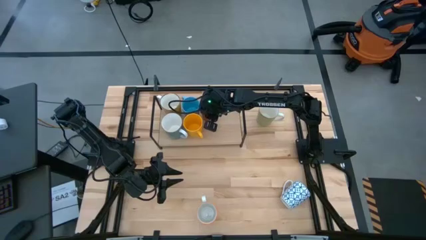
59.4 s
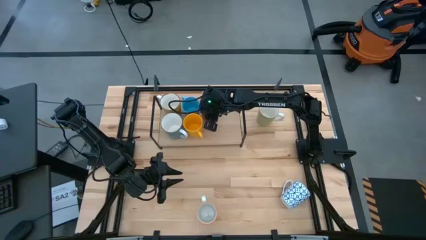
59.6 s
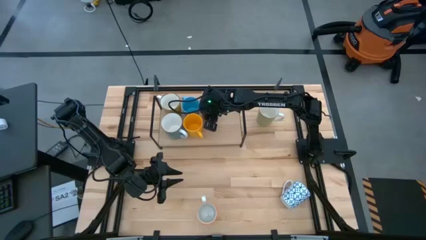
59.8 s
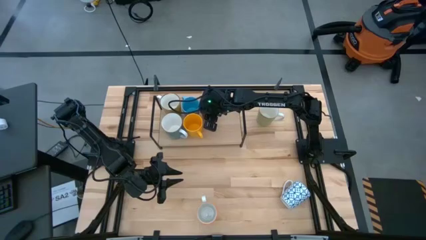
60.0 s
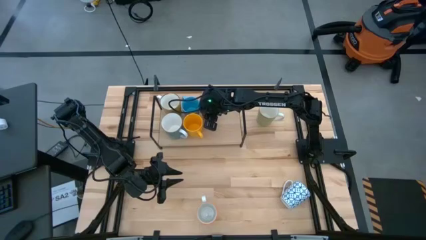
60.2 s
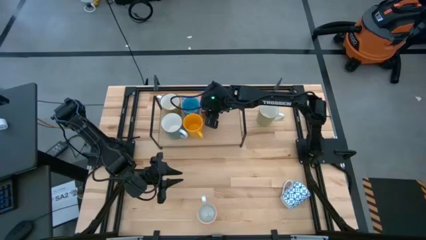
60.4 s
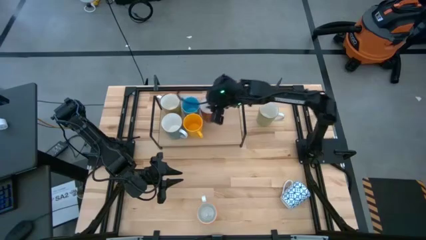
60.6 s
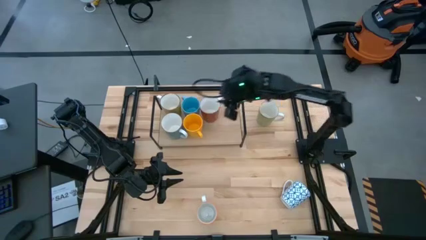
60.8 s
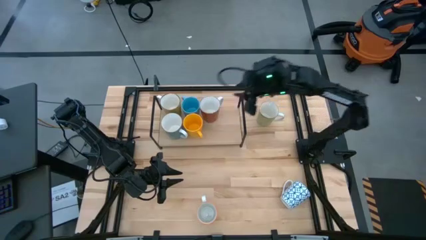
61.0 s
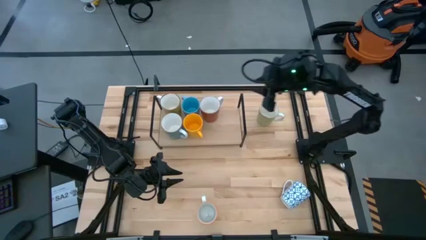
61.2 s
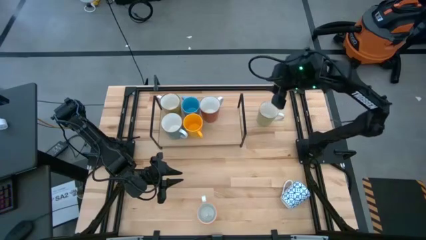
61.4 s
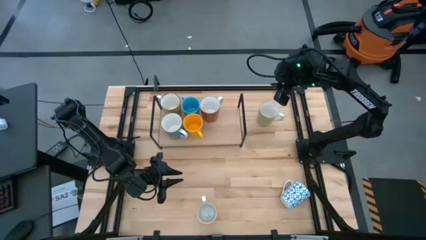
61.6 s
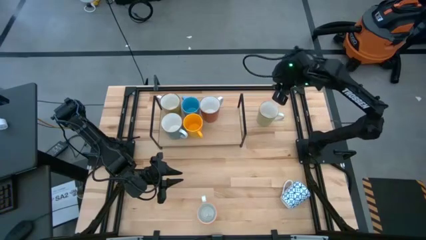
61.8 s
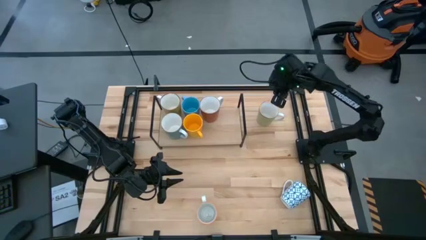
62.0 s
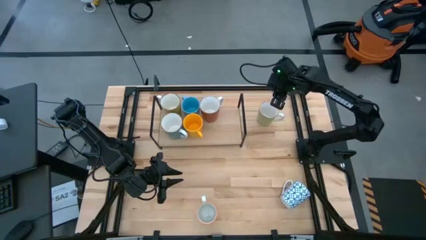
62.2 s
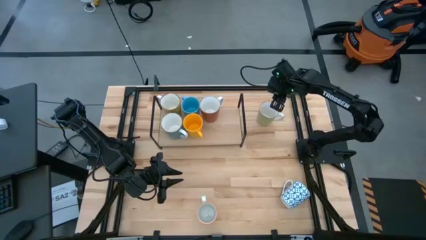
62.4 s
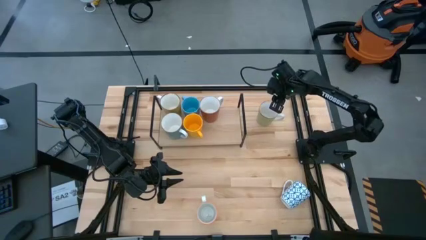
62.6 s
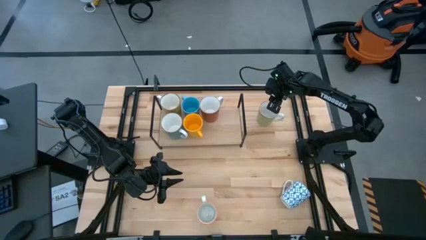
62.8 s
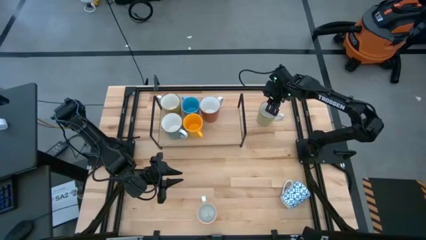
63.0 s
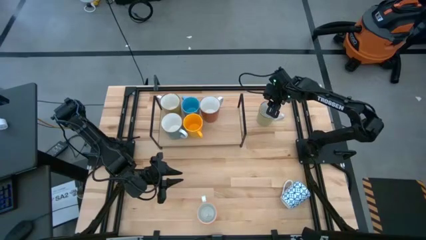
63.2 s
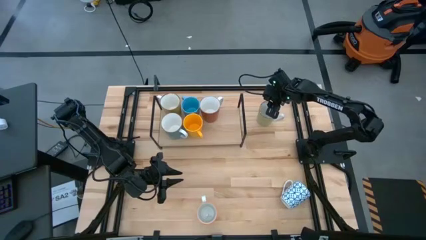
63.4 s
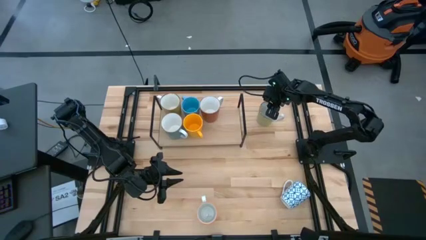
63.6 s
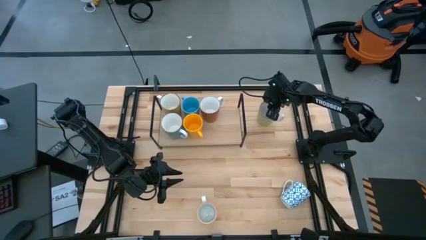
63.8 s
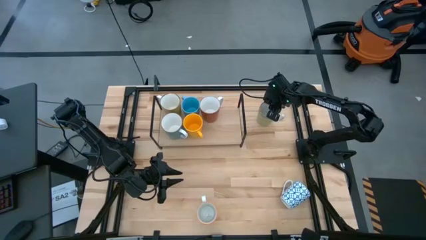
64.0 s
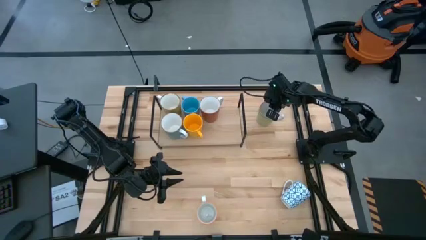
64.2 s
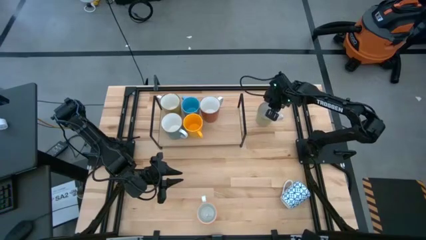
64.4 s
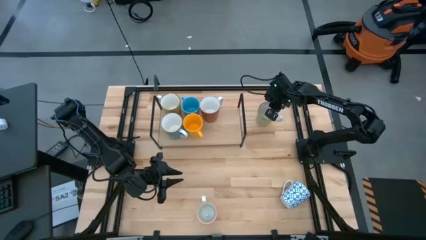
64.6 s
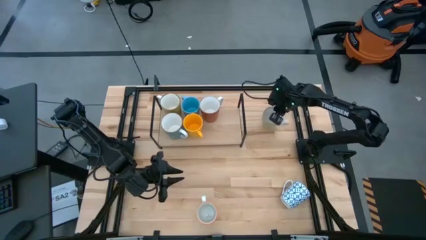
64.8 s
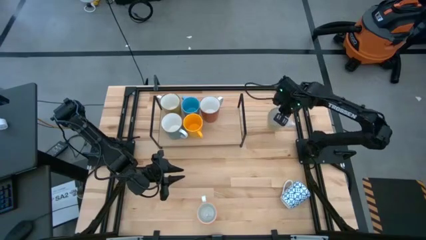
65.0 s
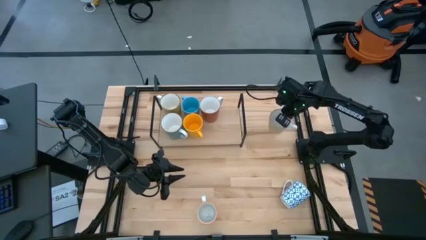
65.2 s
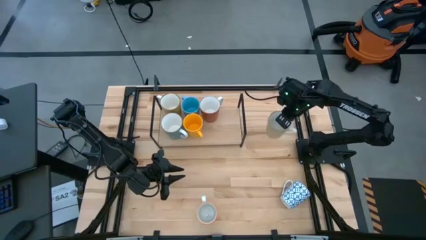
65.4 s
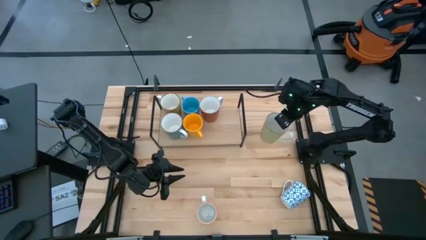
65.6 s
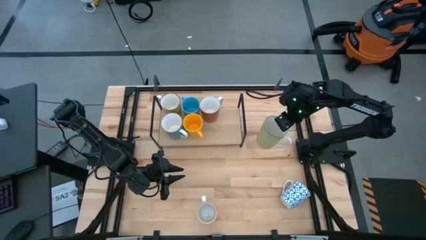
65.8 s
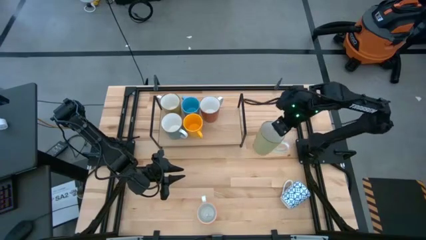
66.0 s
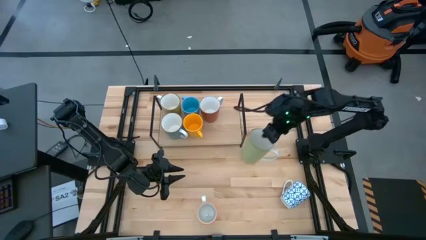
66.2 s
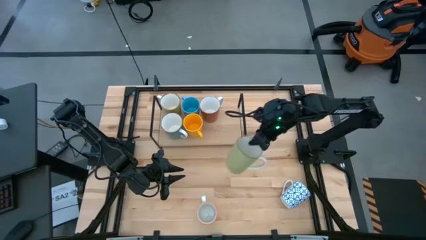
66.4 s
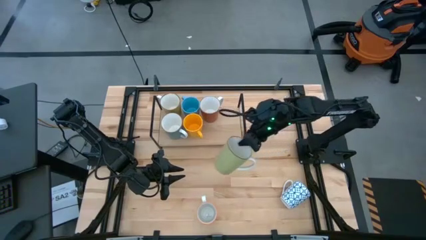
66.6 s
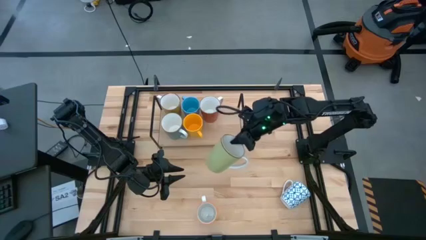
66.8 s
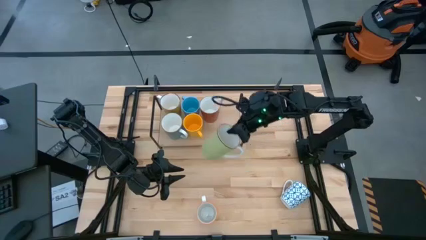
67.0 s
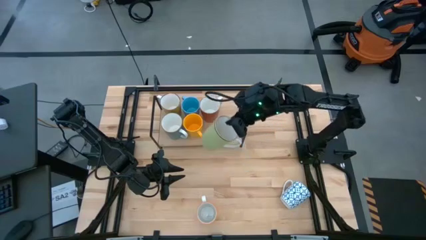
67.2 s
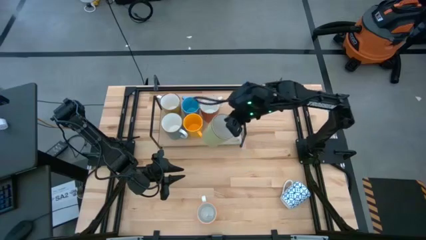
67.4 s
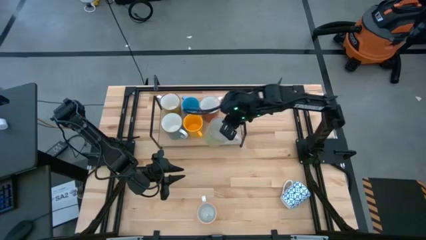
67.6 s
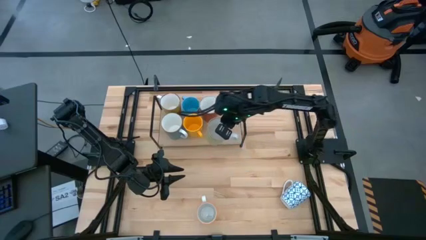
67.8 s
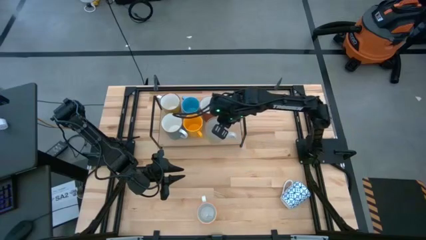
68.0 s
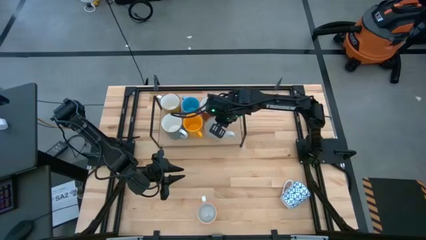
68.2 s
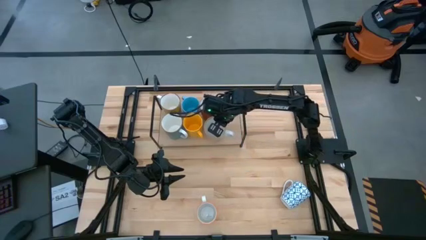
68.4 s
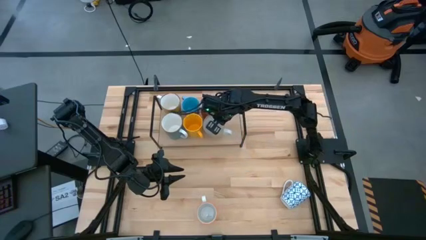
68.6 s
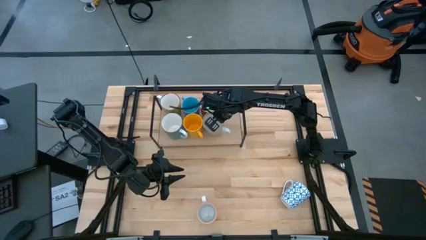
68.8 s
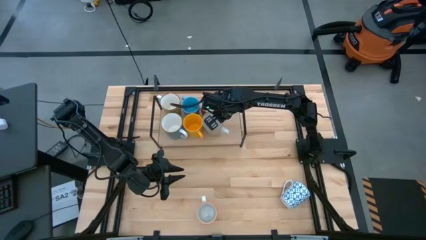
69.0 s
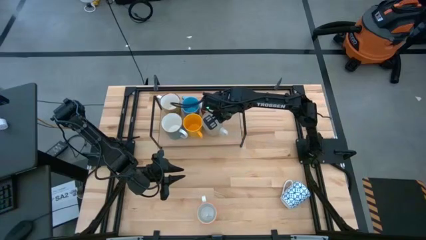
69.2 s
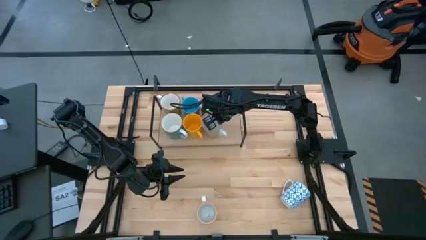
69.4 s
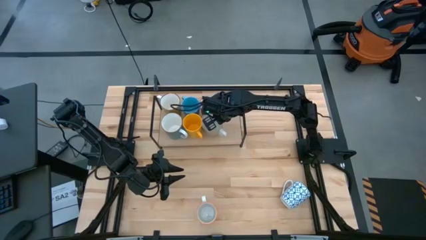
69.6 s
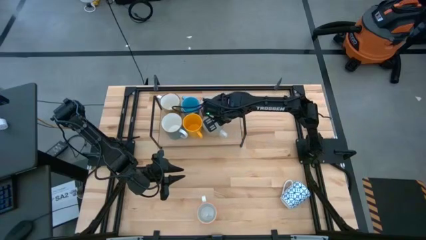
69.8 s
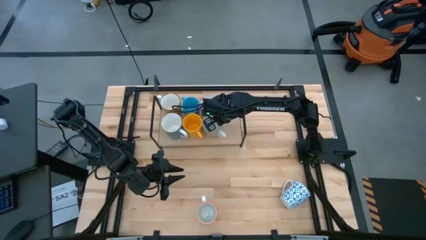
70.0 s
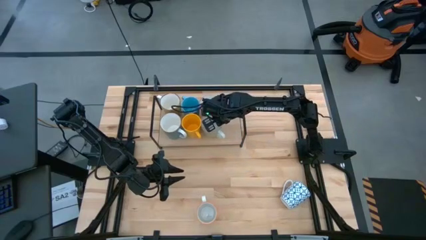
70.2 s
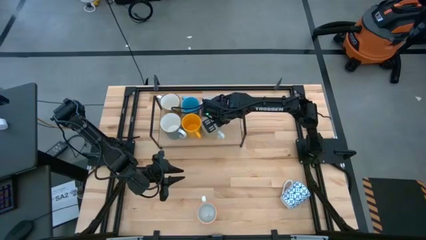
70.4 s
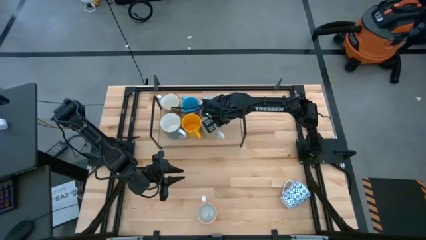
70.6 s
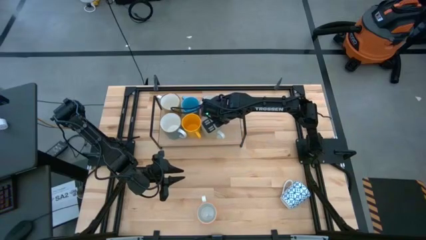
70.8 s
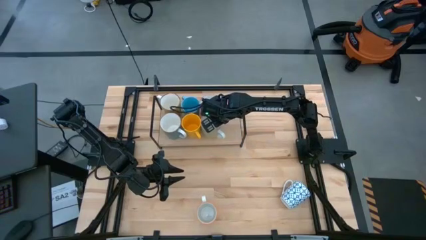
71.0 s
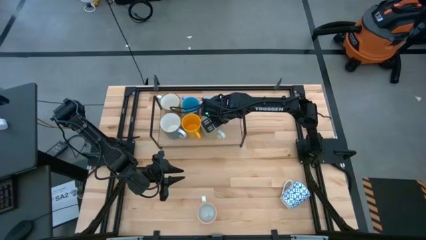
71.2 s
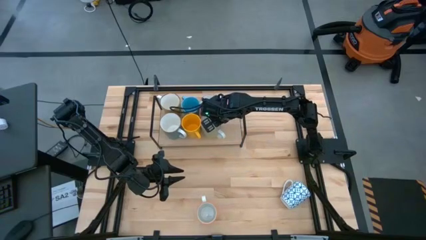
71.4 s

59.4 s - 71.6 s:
Task: Place coffee mugs
Put the light green mug on the shelf
